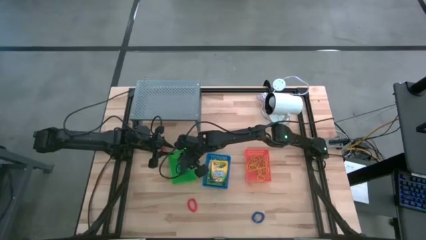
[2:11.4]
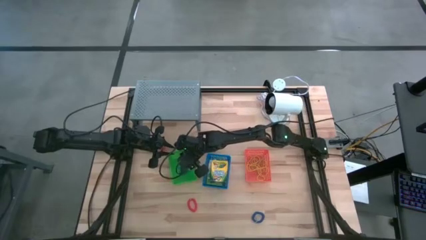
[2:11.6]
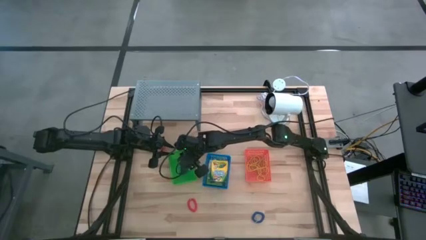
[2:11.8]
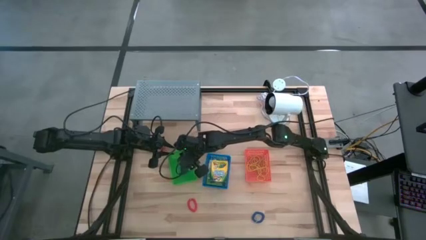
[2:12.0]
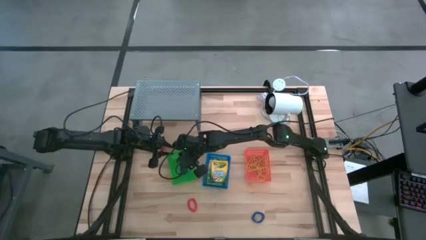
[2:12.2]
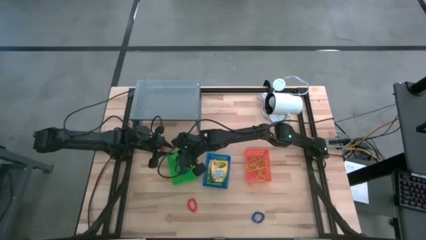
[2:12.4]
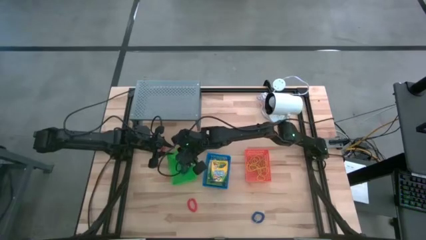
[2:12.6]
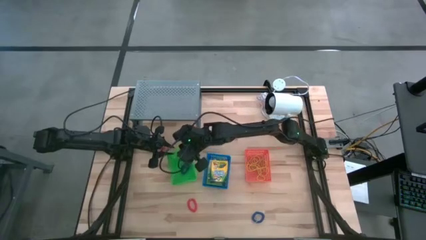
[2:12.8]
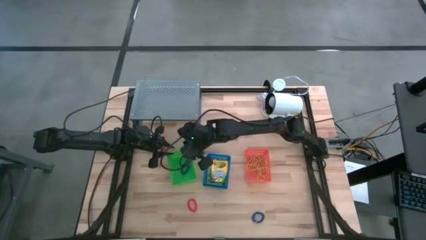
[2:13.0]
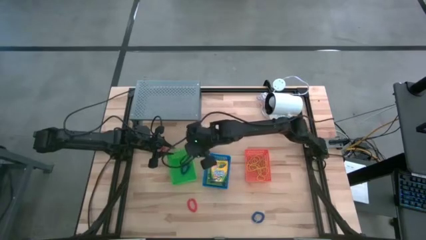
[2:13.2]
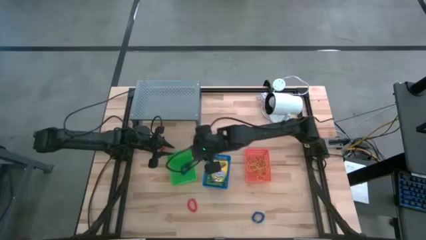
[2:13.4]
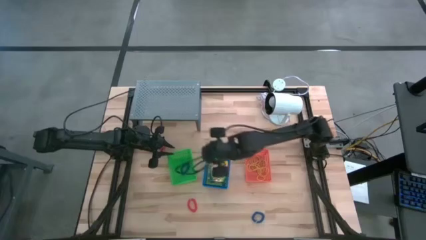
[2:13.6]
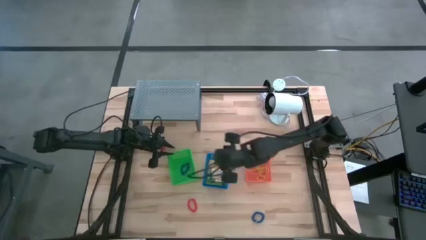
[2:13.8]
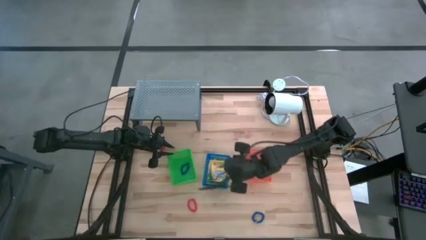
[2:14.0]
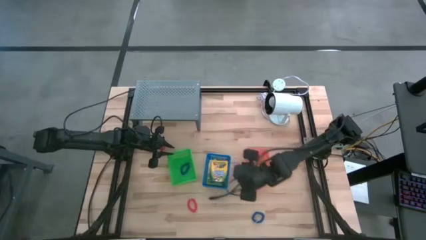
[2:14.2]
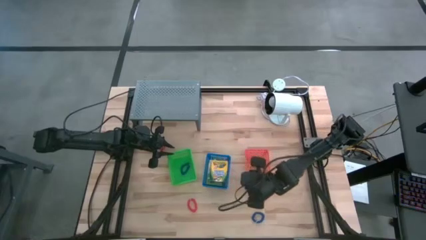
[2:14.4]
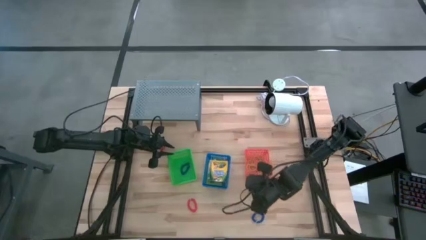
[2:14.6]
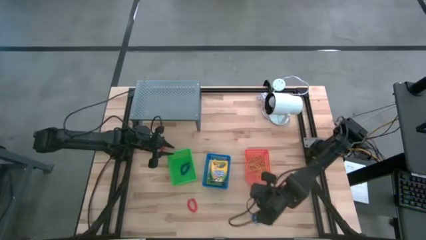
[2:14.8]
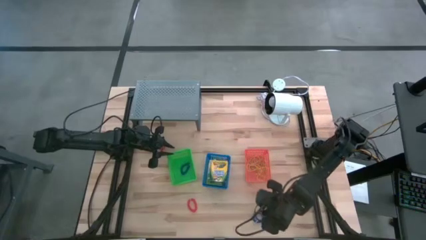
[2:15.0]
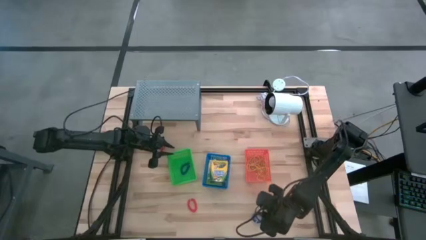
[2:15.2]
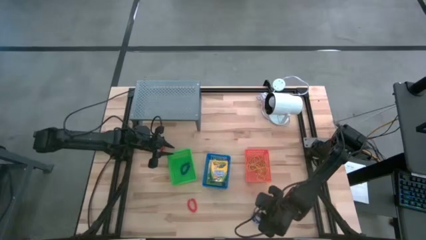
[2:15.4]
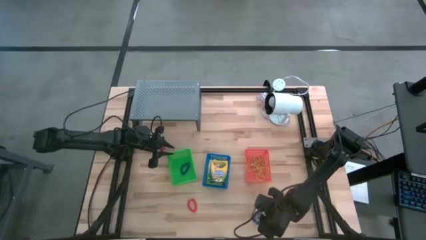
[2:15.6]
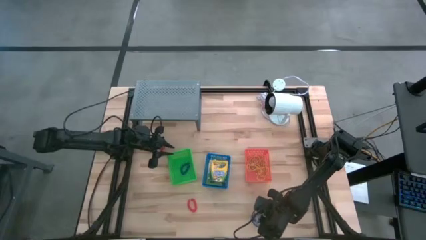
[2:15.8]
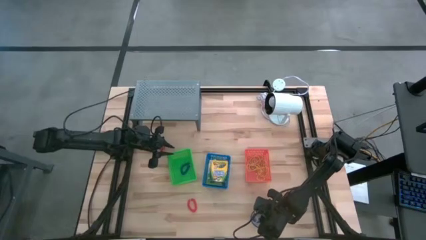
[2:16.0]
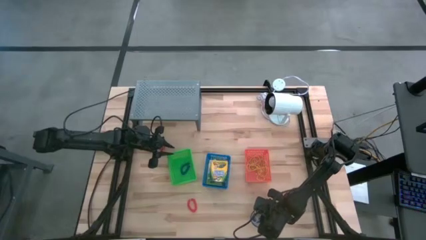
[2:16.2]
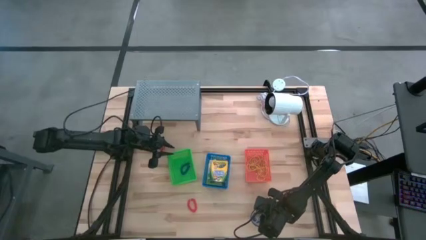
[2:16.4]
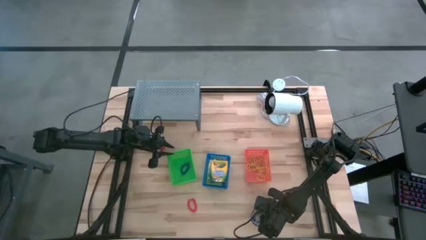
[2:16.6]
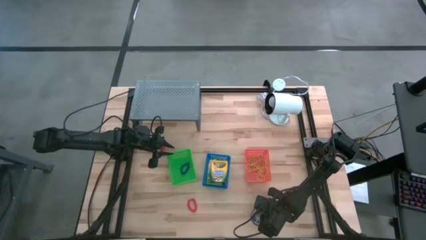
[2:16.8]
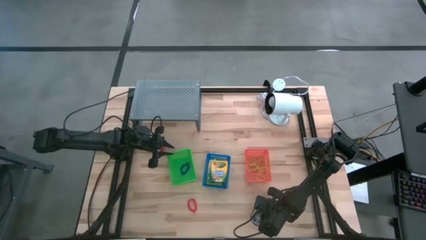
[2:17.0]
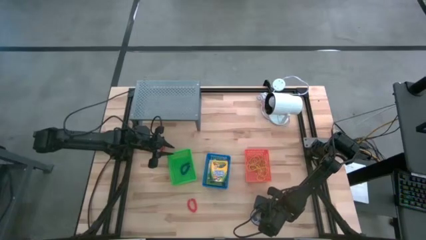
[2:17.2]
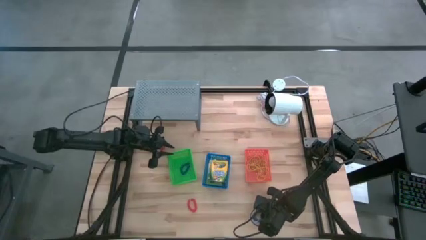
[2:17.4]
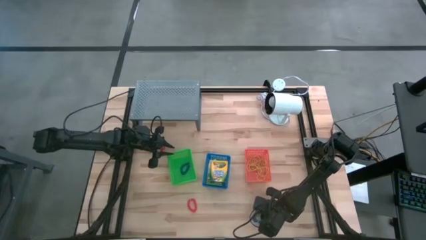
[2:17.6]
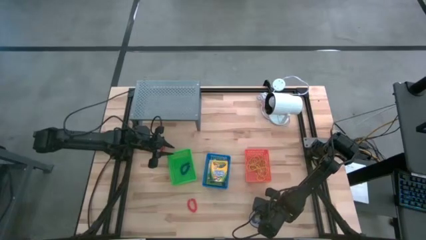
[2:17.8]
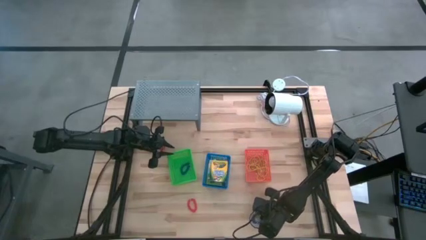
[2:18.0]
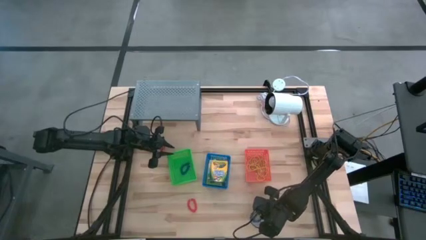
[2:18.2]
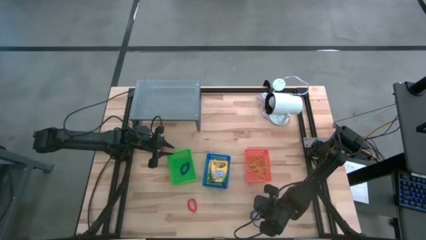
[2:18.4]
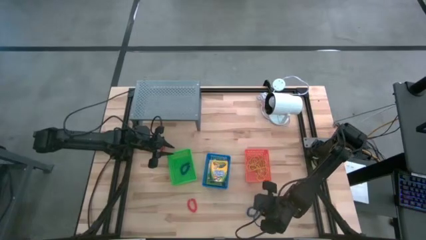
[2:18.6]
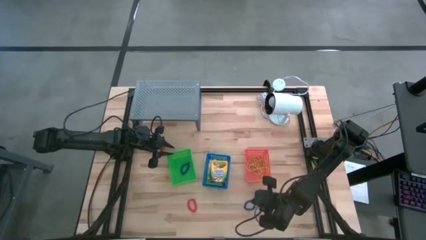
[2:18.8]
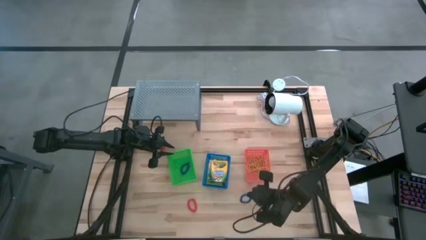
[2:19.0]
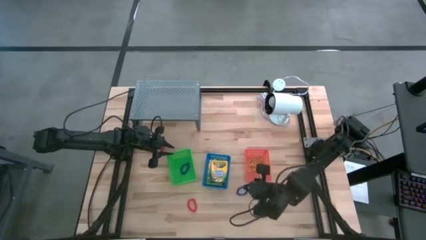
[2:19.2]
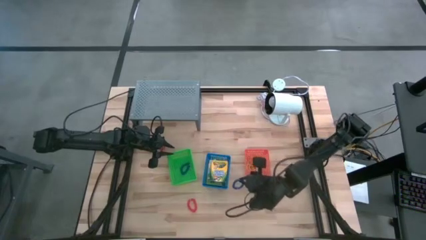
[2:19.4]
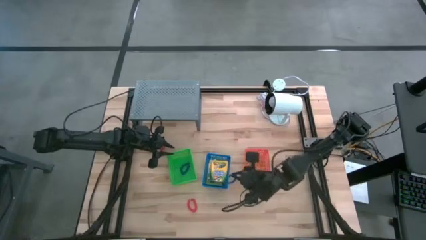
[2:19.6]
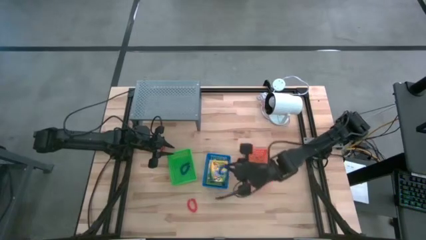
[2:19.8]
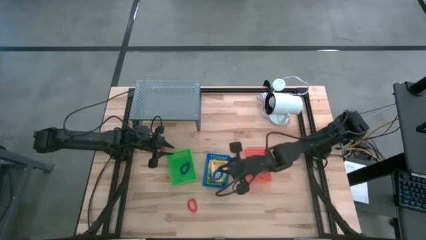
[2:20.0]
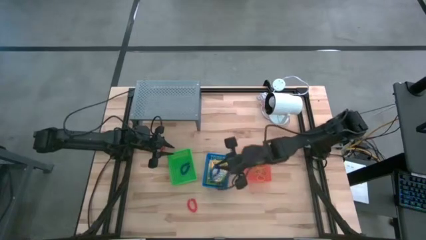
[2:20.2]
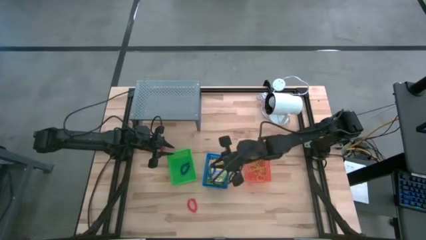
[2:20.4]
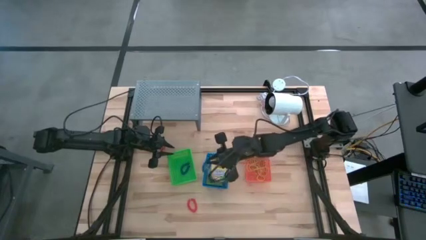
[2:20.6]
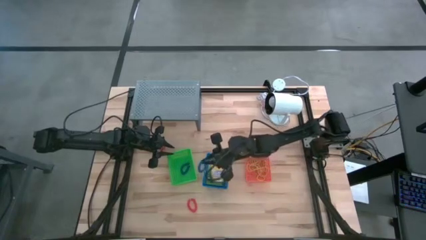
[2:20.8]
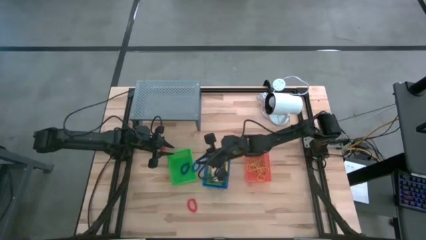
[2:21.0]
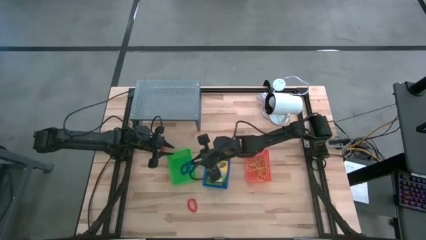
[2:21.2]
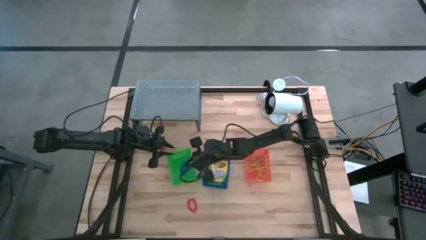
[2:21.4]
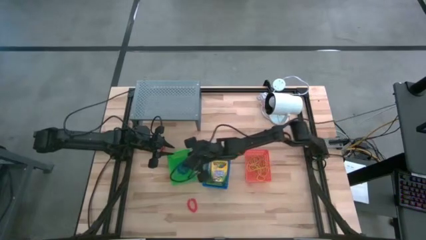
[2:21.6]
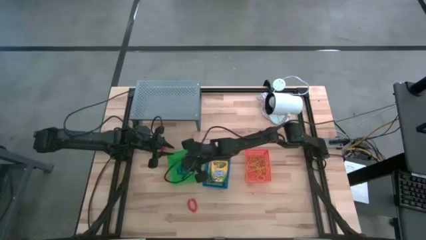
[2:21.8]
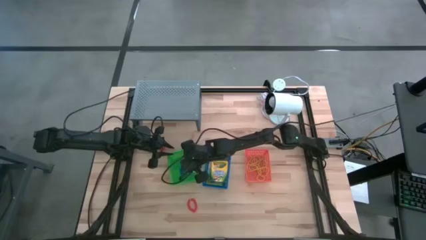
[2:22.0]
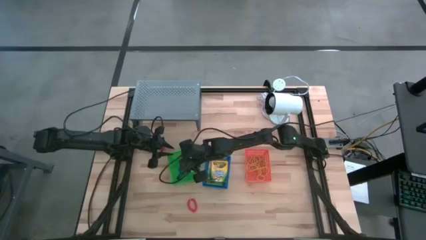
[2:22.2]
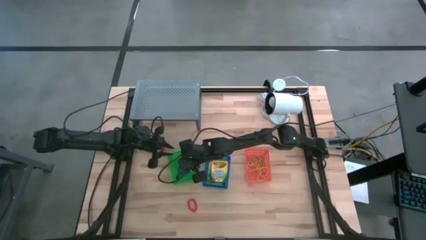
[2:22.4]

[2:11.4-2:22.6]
Task: Pick & Place Office Desk Supplies
Put the blue spring keychain into the green bin

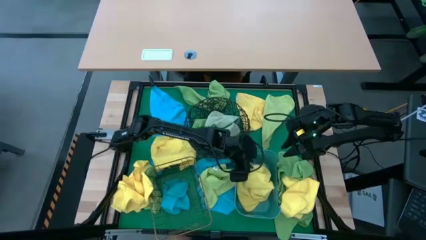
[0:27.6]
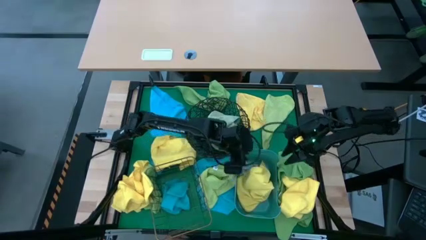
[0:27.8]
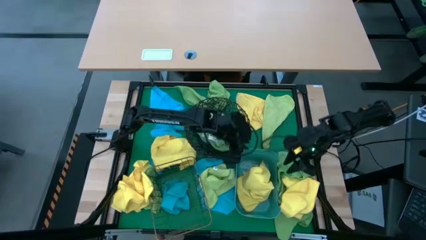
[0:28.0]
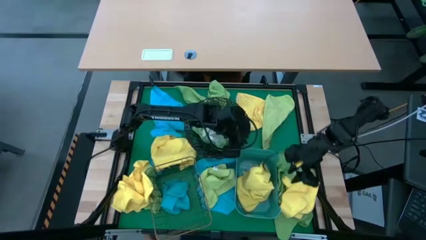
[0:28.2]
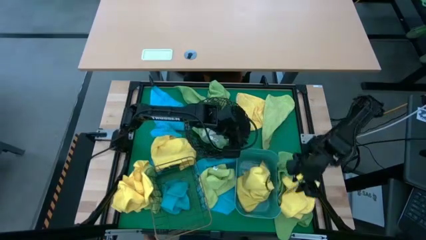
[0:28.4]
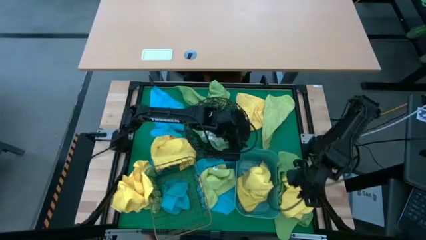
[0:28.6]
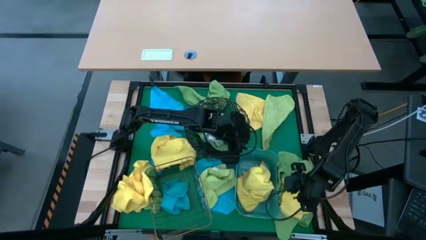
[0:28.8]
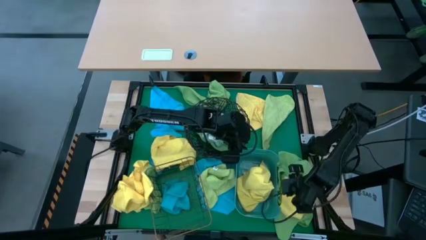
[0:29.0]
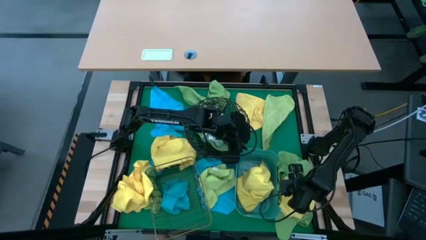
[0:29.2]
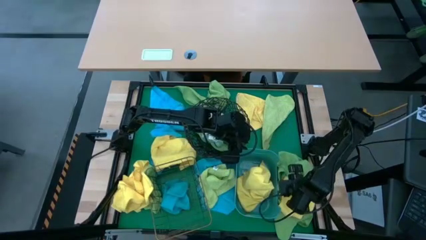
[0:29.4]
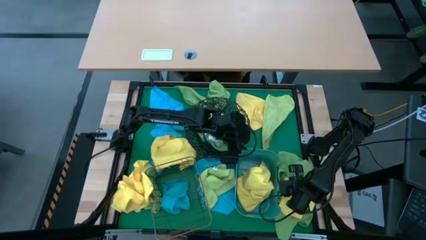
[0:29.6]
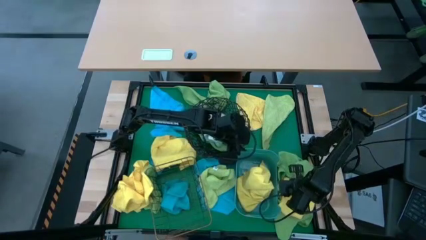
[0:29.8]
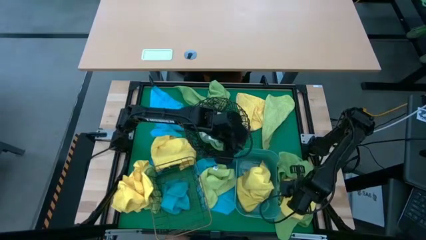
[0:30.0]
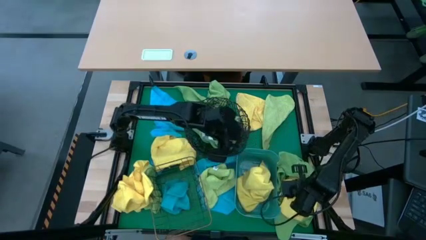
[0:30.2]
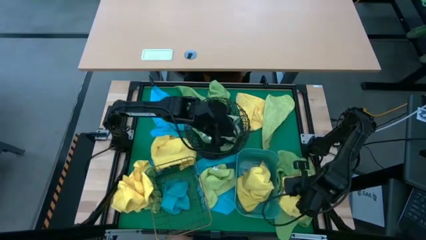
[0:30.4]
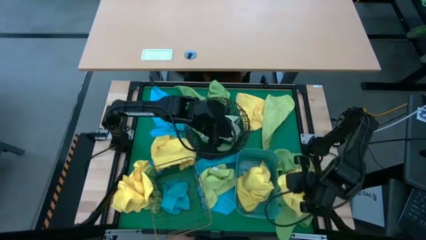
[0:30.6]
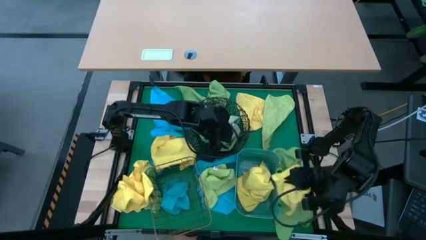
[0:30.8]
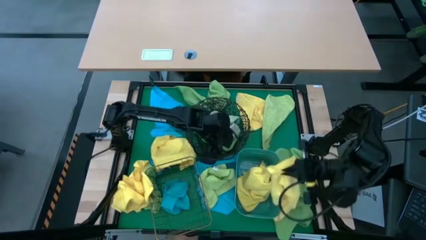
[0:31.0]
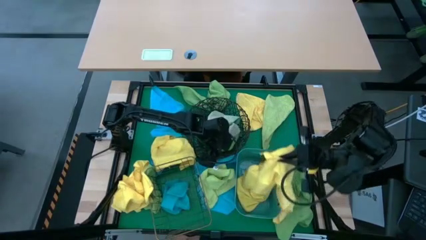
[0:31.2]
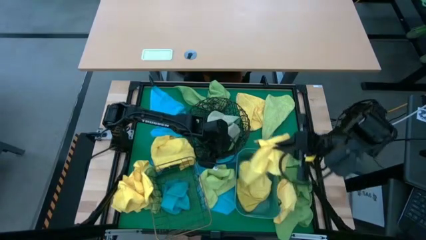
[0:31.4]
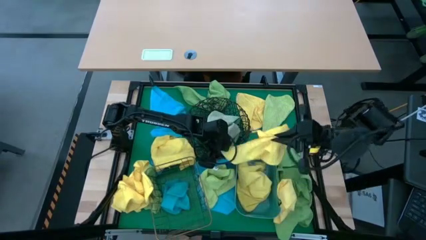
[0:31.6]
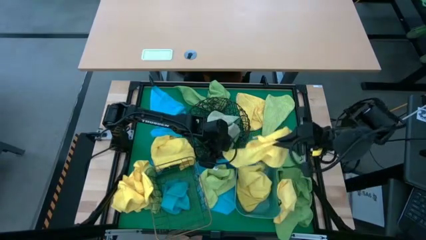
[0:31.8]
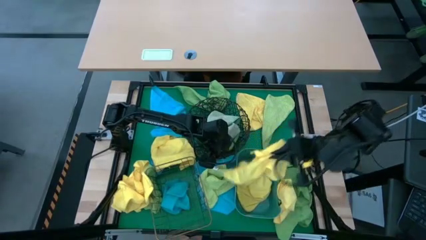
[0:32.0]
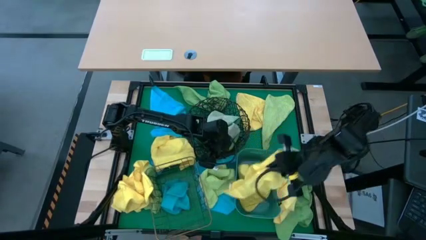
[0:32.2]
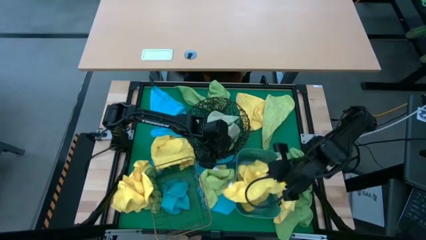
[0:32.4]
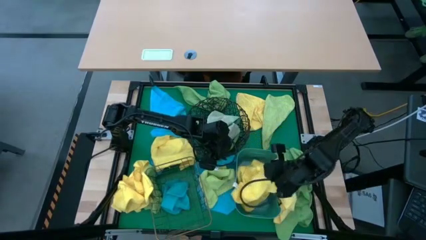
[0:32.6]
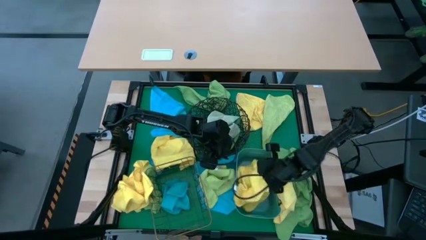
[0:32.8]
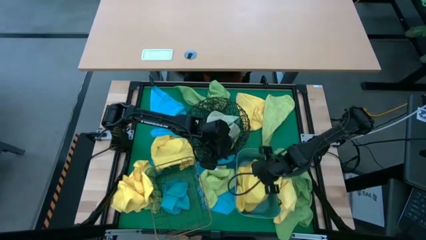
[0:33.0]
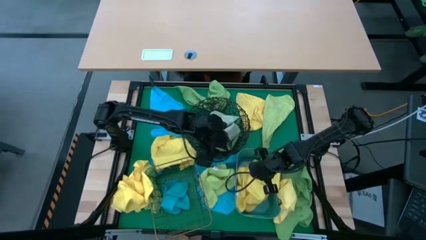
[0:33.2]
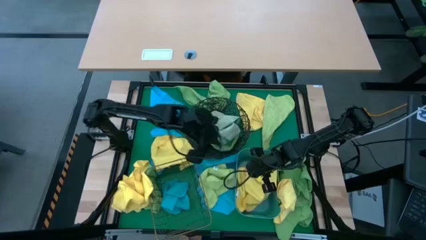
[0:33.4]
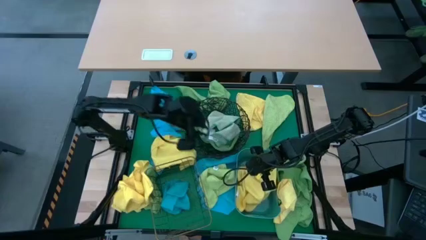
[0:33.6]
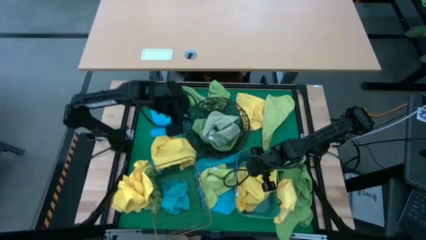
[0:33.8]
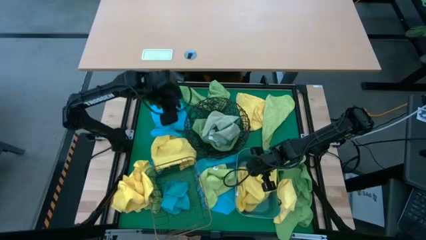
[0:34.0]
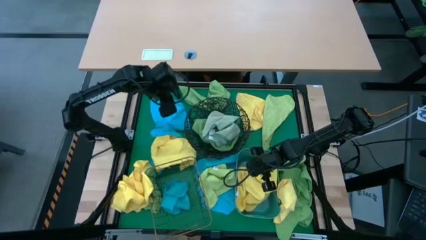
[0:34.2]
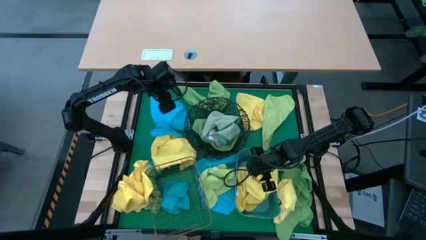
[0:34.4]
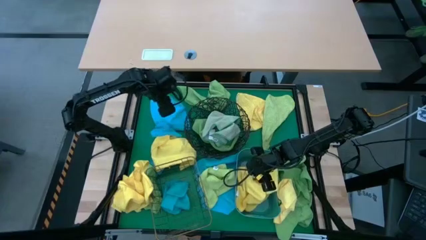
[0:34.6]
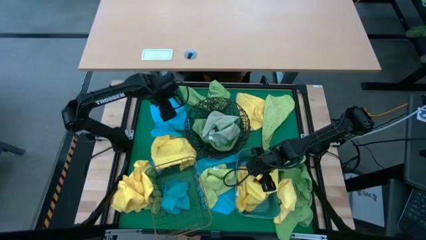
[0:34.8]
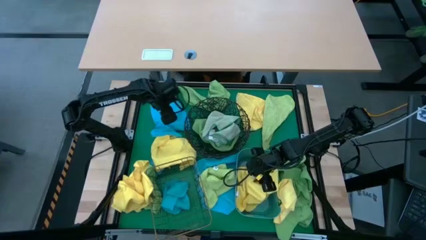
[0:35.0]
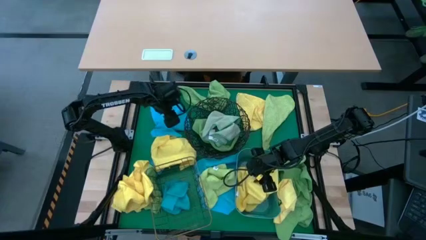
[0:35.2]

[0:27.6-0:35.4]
Task: Sort microfiber towel by color & place in baskets
Put the yellow microfiber cloth into the blue bin
